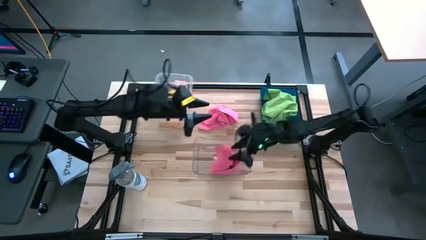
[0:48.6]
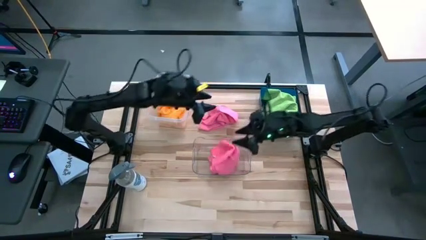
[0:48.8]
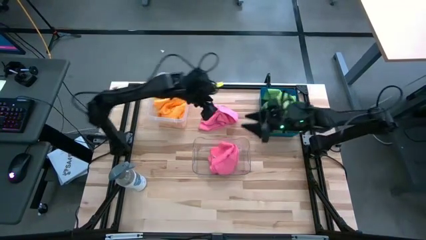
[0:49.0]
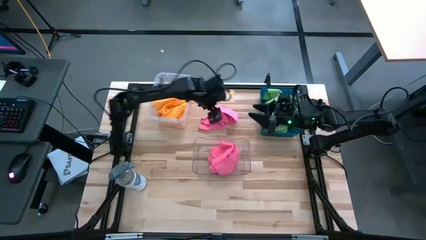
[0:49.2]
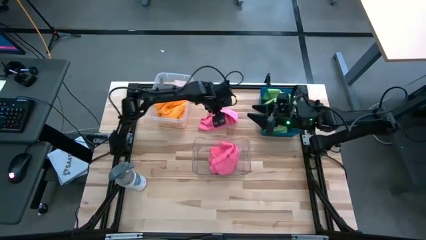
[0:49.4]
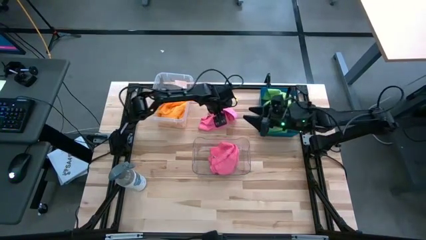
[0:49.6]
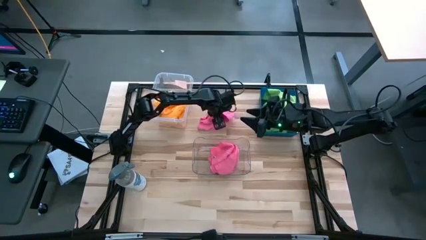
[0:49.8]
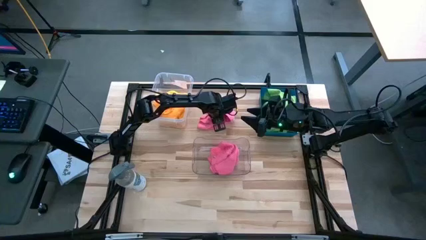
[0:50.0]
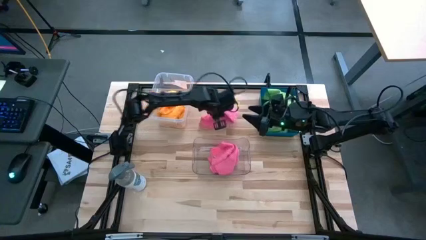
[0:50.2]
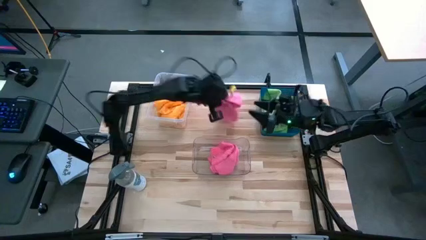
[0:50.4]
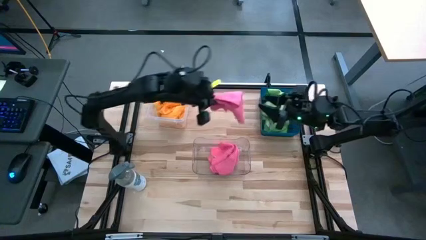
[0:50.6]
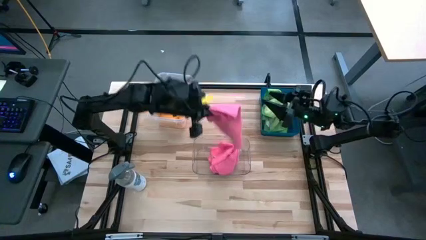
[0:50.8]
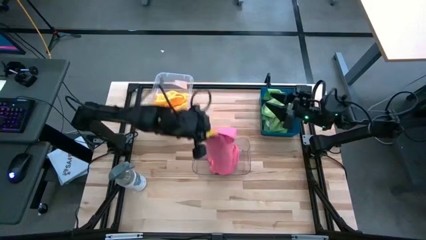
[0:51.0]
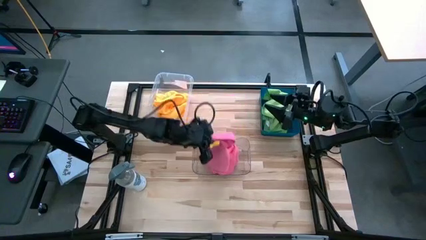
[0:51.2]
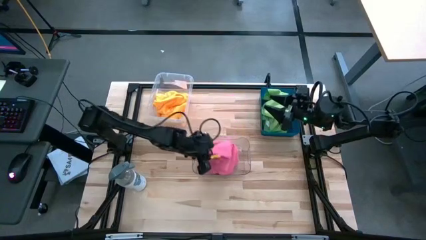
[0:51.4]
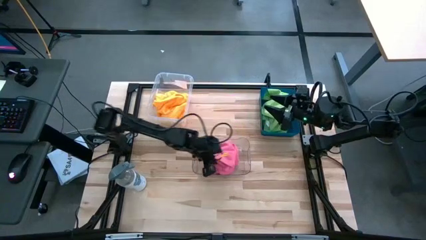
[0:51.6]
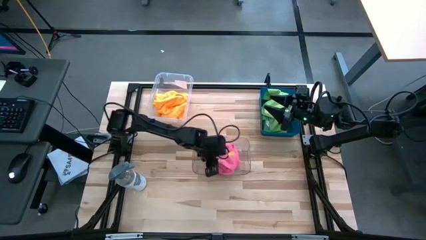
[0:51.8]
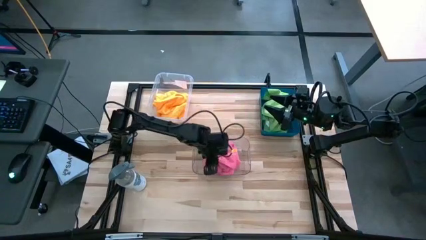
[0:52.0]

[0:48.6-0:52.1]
Task: Sort microfiber towel by color & place in baskets
Put the pink microfiber cloth into the bottom transparent bin

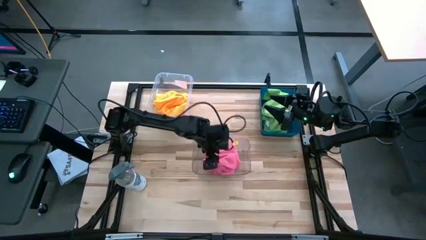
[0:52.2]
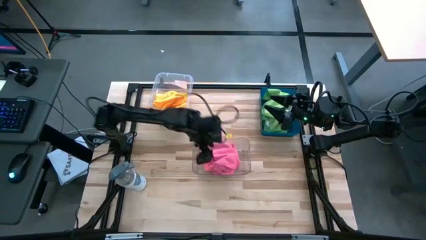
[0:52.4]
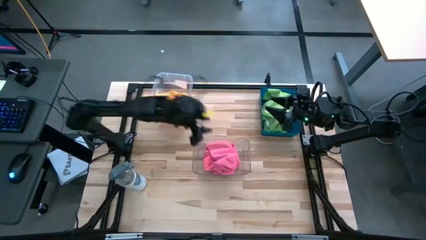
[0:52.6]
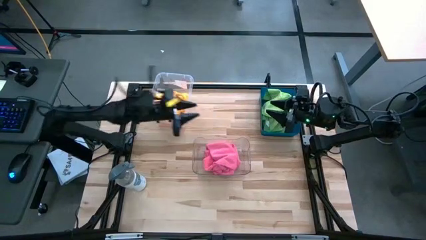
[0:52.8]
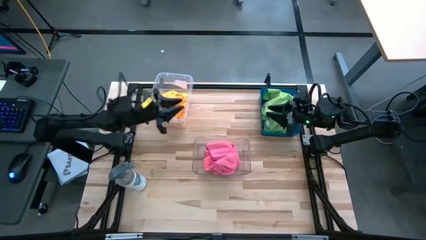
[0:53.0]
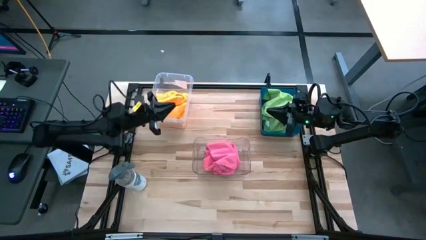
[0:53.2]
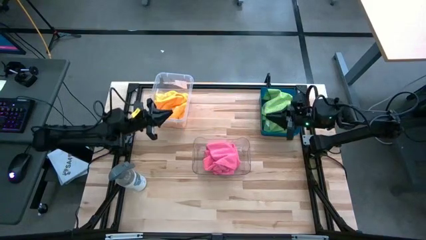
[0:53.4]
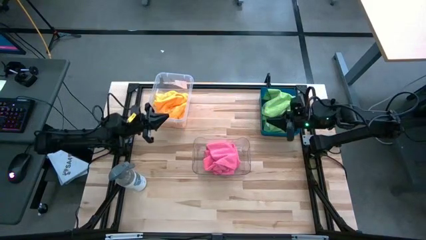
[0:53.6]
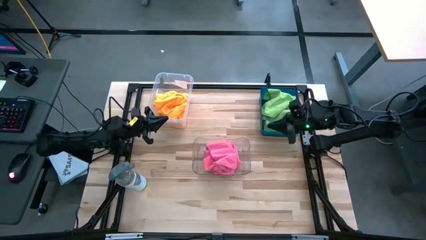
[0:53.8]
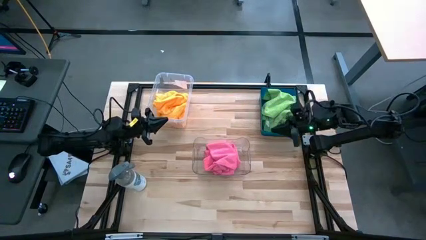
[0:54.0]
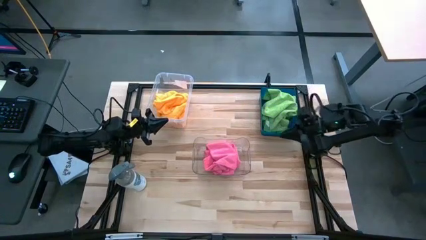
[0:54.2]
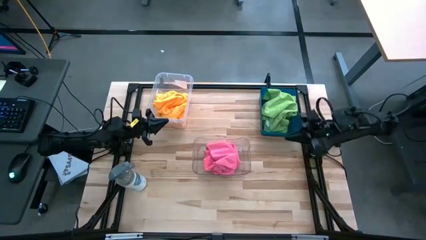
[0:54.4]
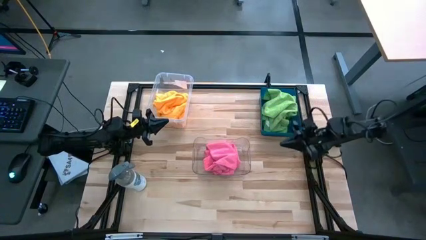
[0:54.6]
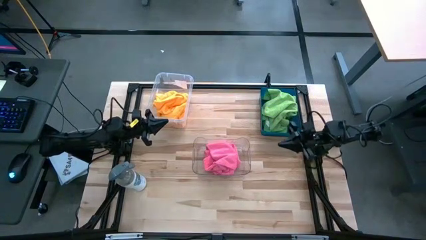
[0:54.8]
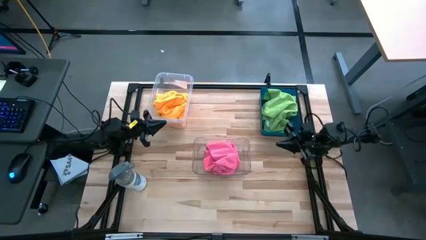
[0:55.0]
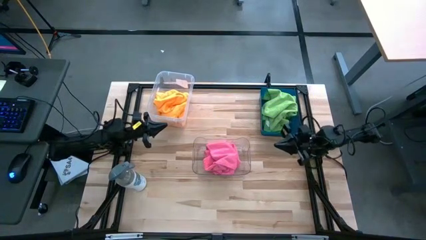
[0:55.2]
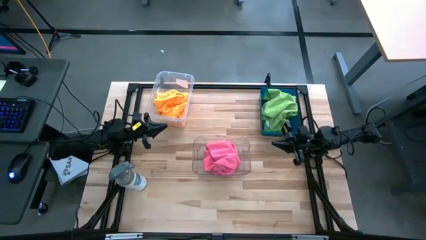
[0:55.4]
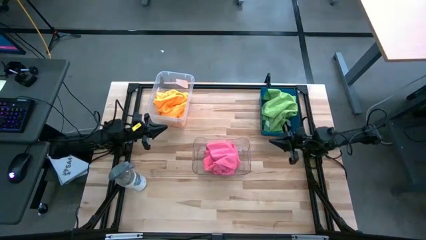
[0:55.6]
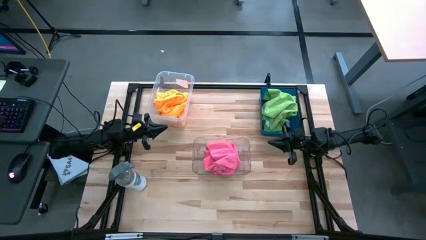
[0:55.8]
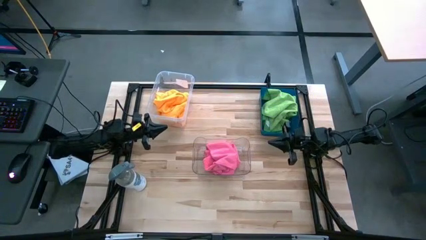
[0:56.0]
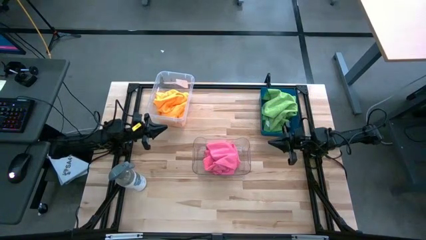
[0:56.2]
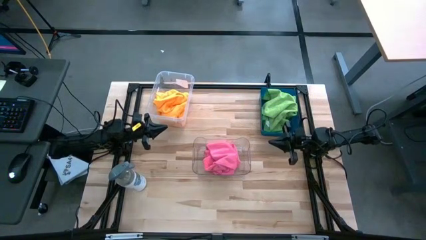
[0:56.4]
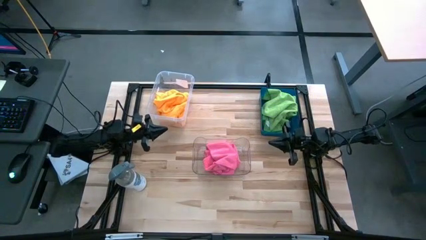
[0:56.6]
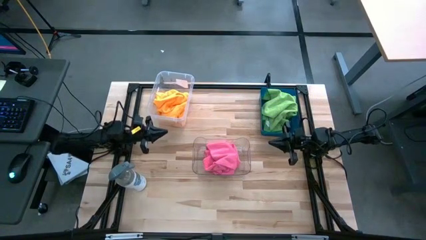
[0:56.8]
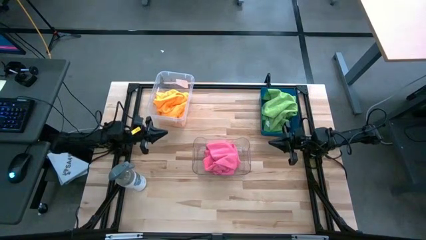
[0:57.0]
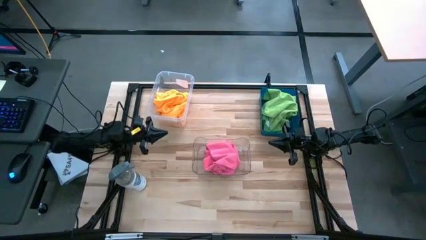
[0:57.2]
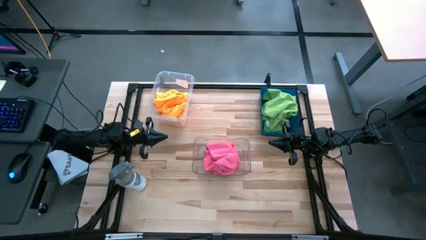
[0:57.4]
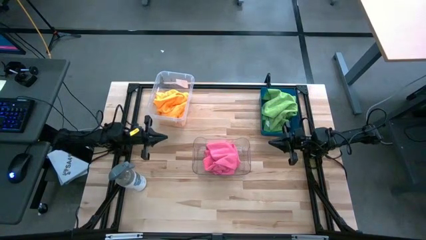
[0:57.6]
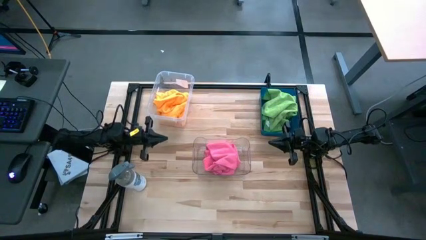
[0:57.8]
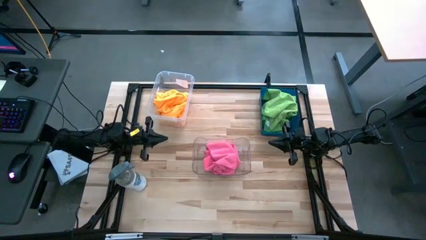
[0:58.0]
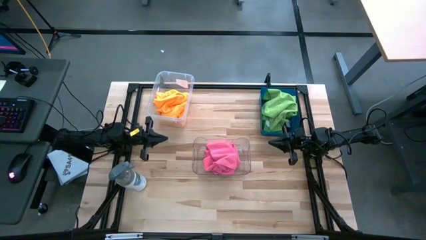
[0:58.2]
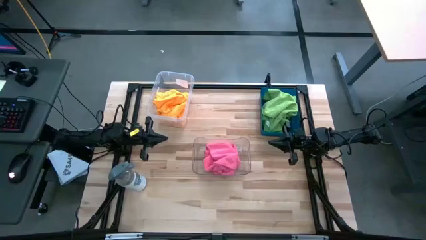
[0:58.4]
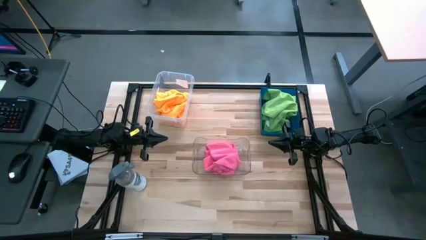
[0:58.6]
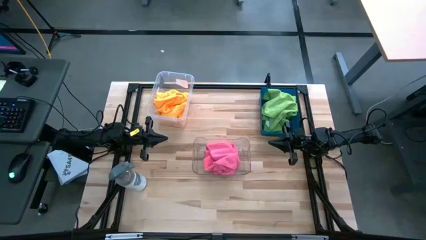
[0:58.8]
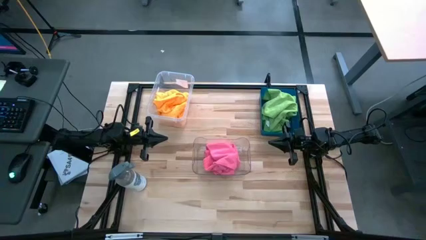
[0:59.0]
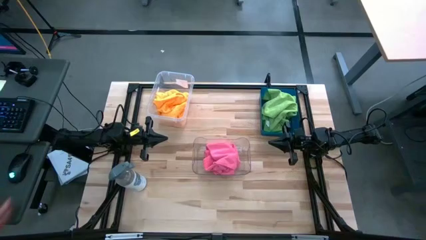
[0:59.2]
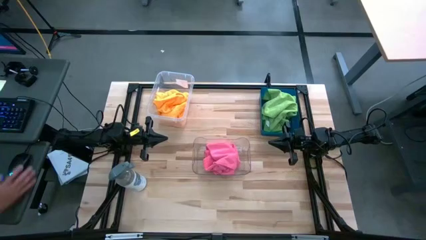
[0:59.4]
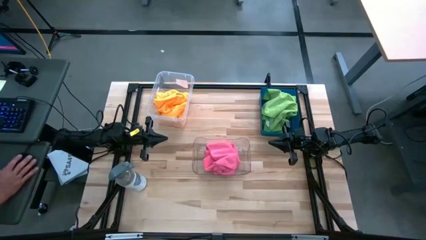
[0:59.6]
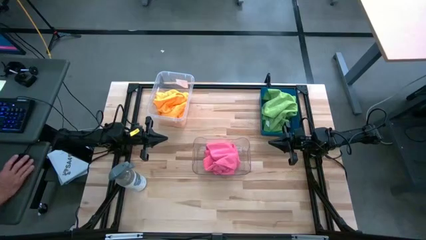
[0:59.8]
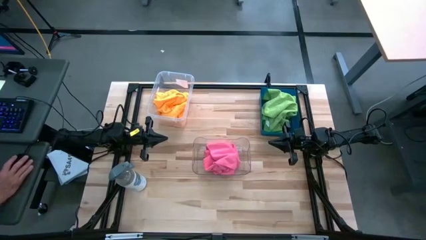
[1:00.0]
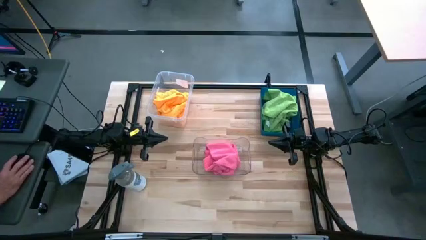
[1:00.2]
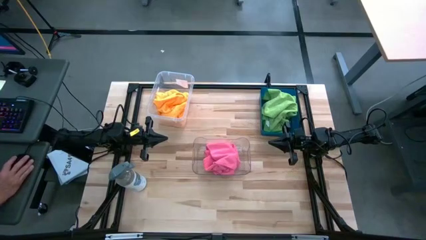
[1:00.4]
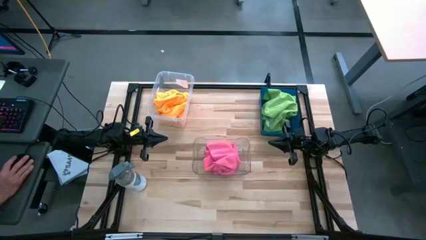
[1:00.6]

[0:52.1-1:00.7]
Return to Home Position

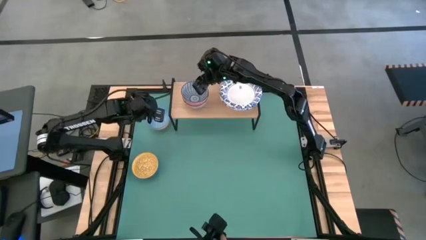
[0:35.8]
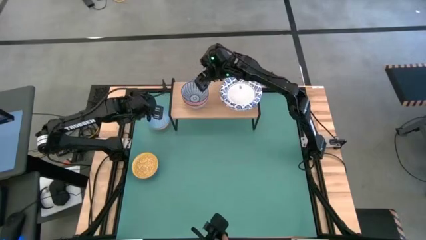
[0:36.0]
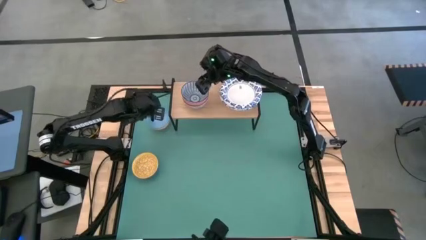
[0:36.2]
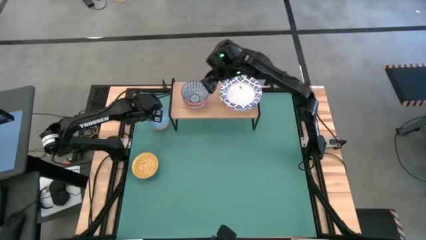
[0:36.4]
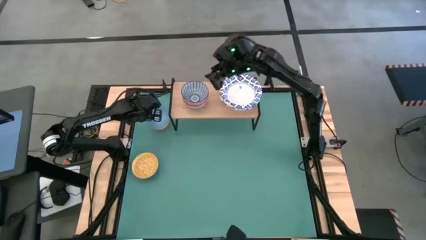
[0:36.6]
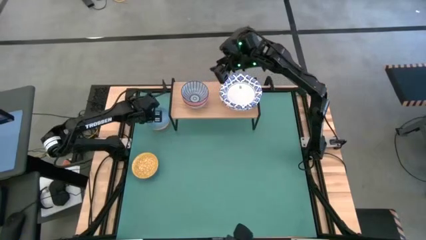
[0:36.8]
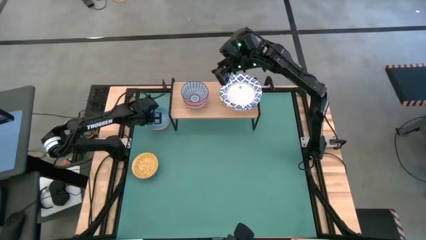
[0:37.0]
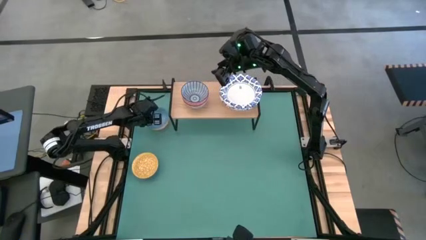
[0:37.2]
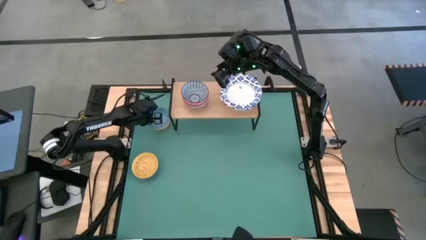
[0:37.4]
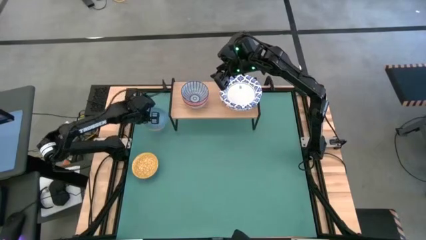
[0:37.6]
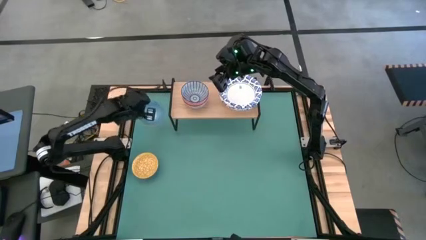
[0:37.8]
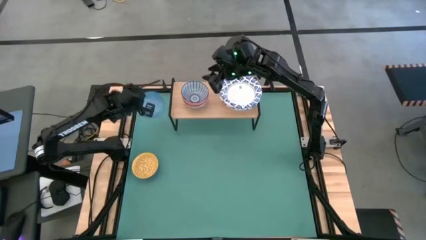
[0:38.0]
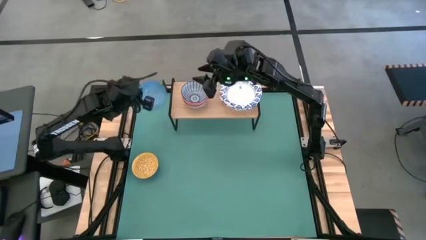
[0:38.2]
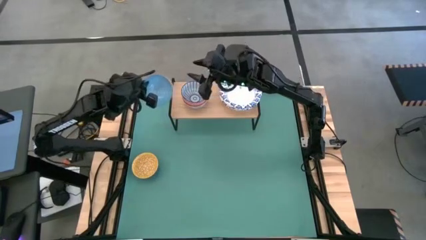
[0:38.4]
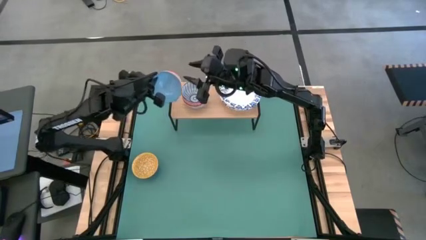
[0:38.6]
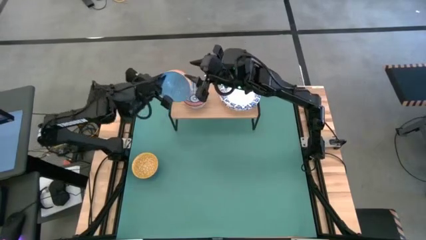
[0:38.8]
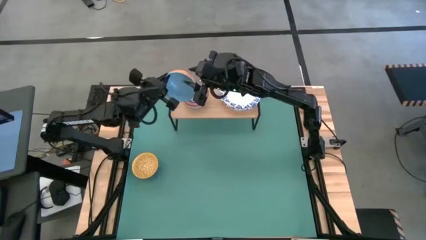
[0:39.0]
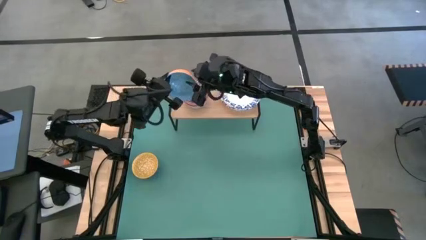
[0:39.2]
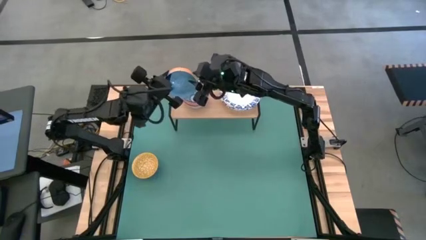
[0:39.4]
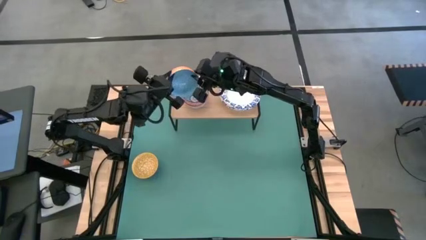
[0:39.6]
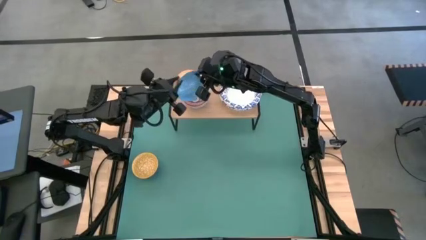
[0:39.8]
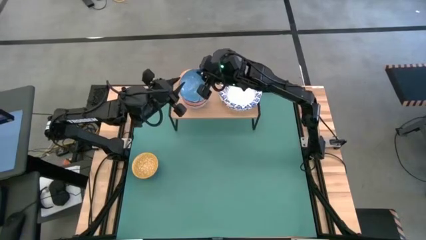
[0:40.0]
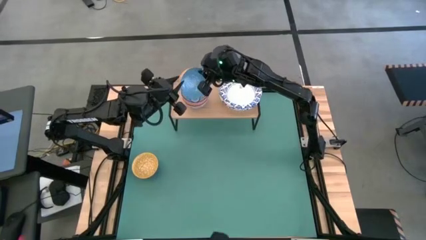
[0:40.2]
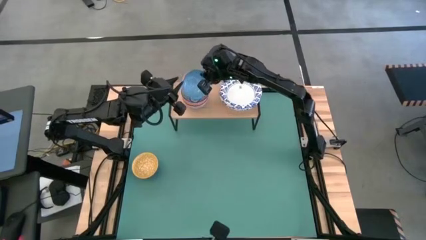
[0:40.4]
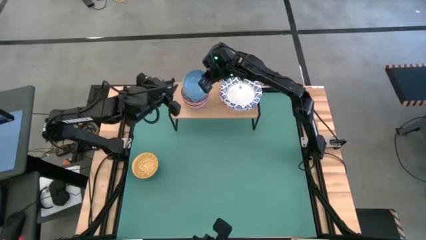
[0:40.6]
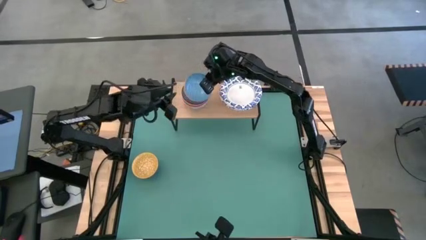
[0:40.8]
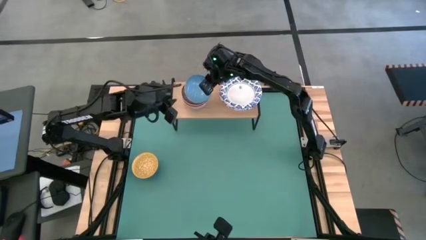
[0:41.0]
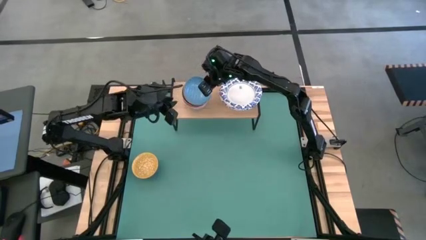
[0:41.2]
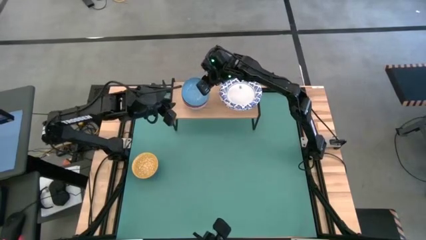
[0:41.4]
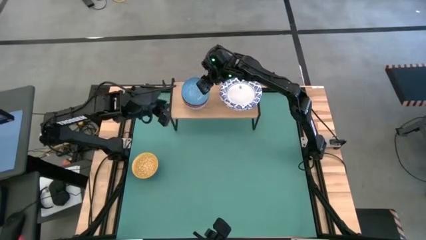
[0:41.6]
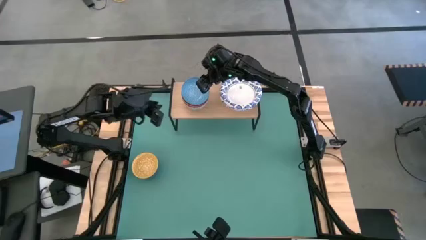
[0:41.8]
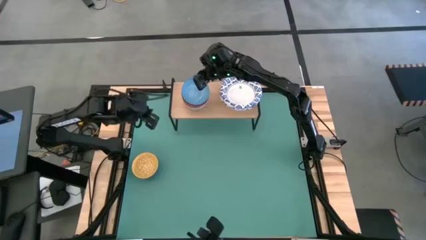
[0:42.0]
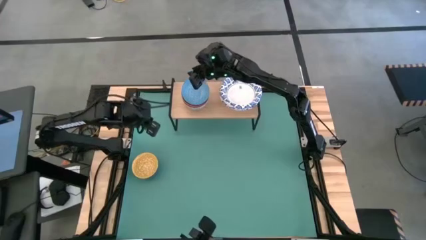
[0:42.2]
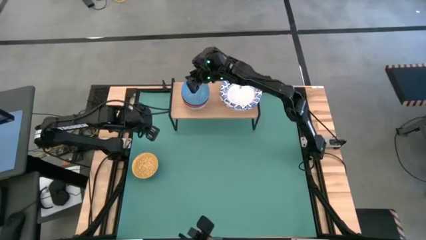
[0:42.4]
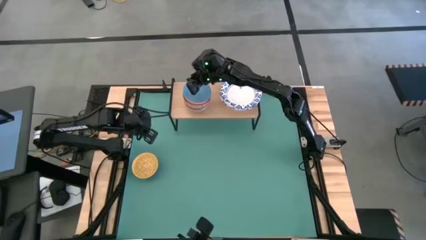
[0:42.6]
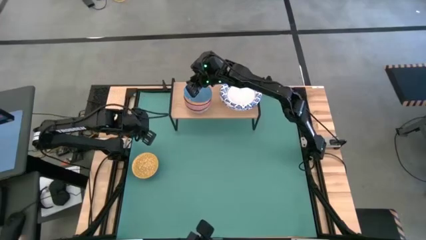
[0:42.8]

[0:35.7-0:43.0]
Task: Place and stack bowls onto a shelf
Stack the light blue patterned bowl on top of the blue patterned bowl on the shelf
